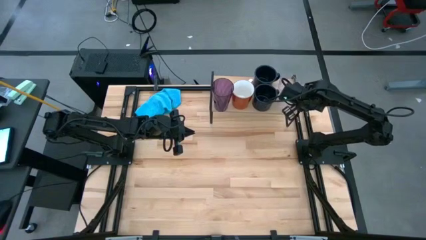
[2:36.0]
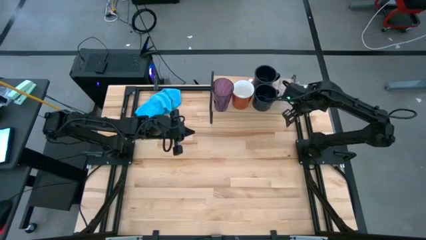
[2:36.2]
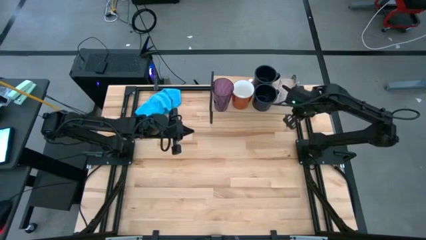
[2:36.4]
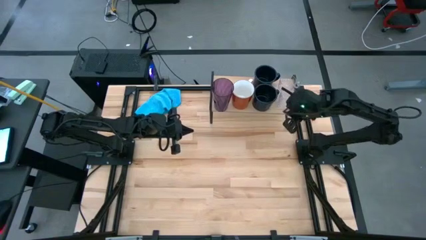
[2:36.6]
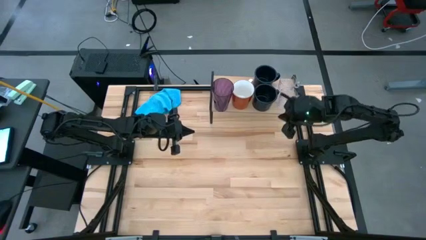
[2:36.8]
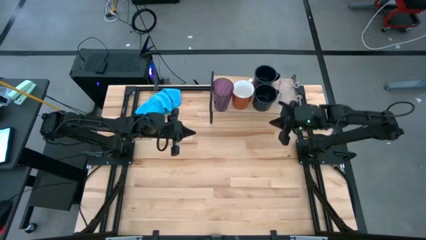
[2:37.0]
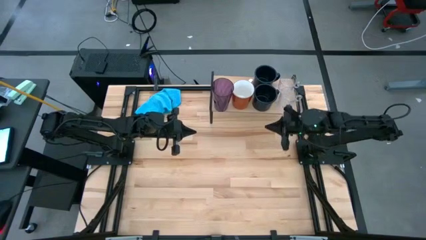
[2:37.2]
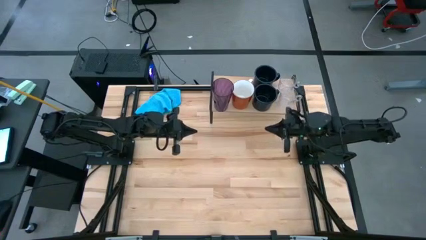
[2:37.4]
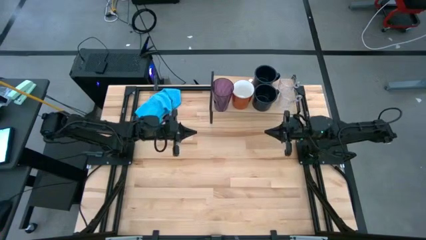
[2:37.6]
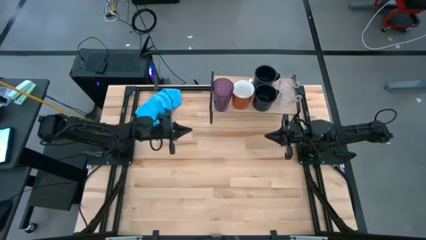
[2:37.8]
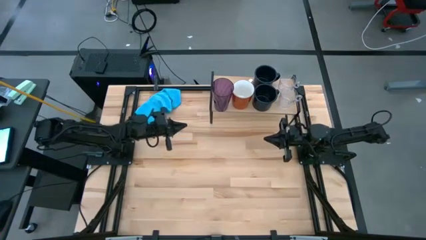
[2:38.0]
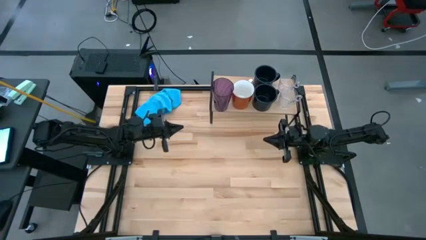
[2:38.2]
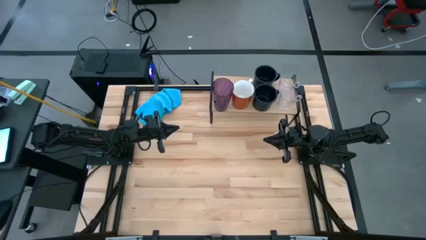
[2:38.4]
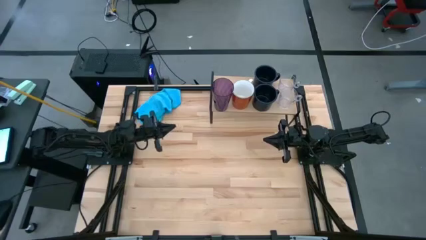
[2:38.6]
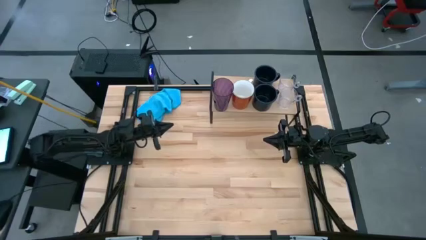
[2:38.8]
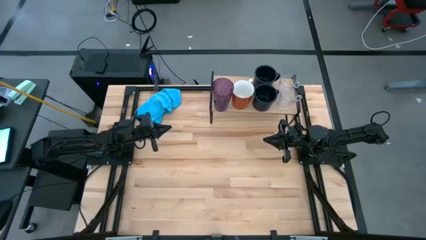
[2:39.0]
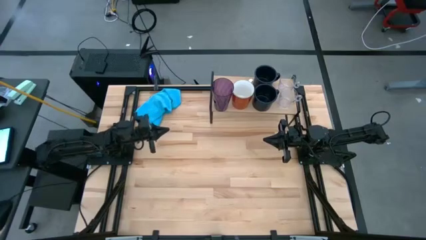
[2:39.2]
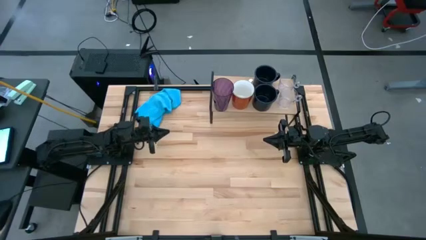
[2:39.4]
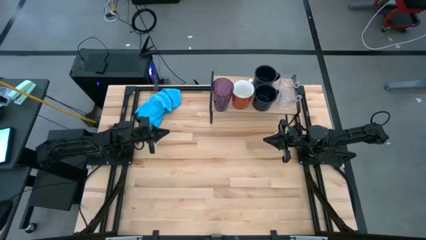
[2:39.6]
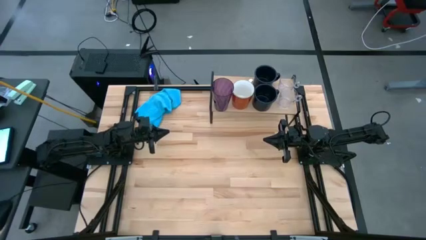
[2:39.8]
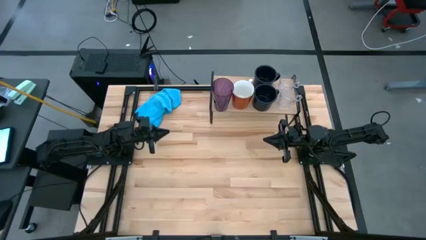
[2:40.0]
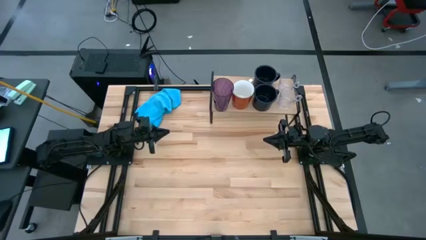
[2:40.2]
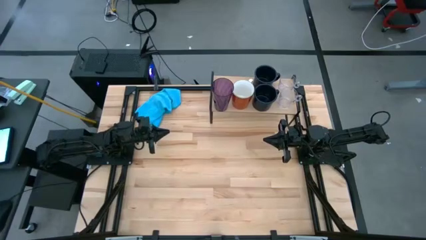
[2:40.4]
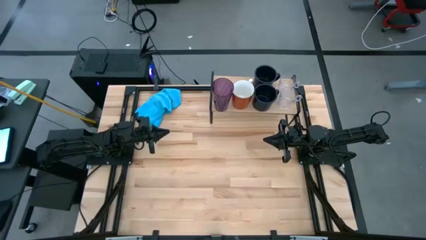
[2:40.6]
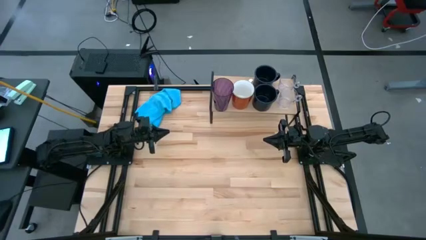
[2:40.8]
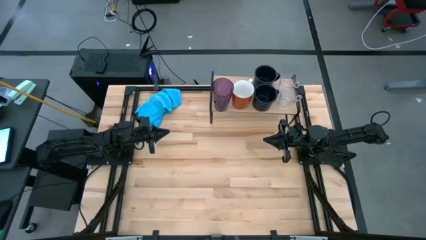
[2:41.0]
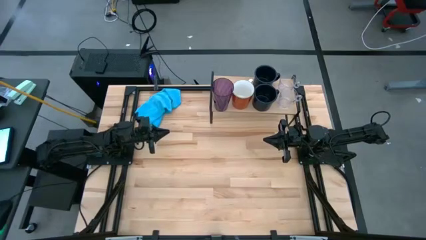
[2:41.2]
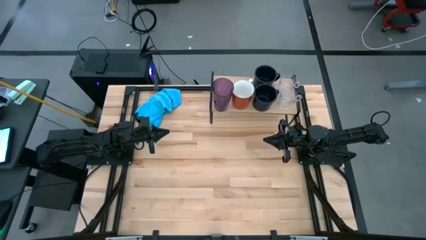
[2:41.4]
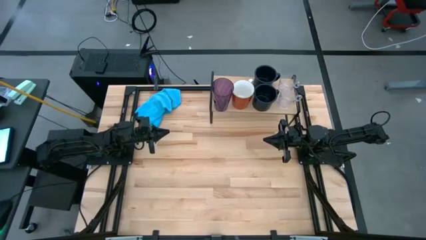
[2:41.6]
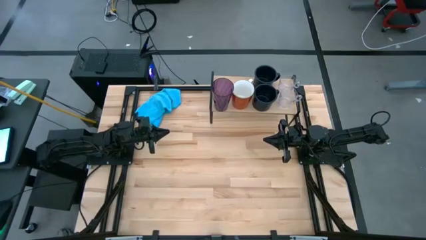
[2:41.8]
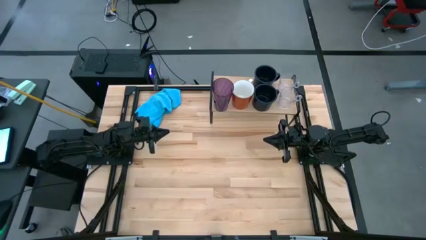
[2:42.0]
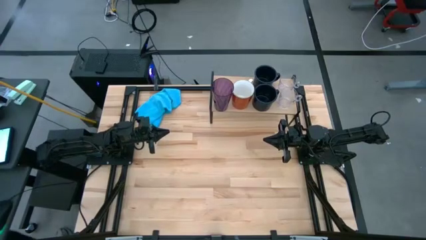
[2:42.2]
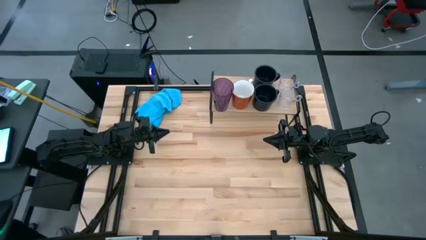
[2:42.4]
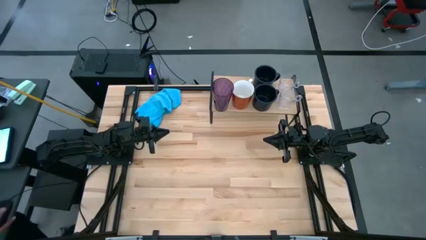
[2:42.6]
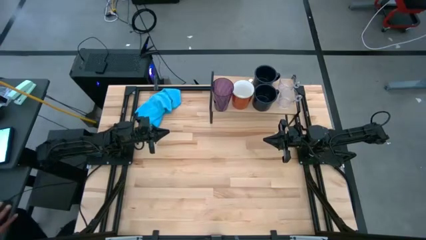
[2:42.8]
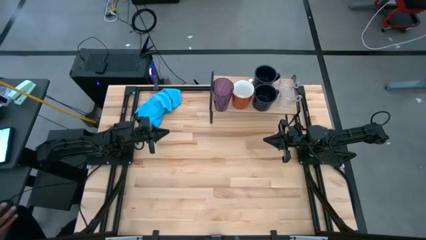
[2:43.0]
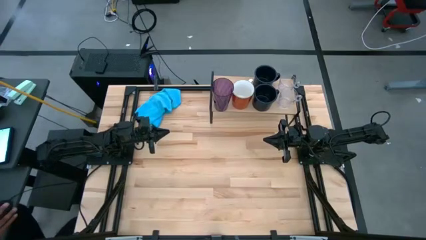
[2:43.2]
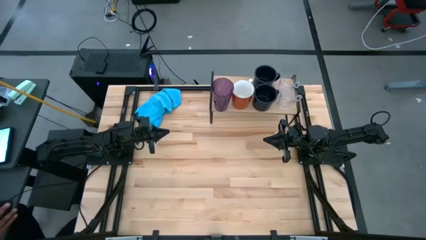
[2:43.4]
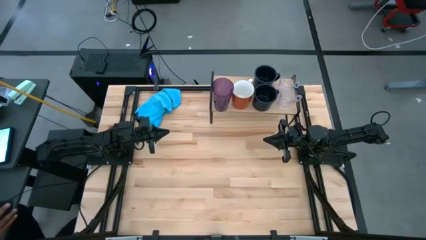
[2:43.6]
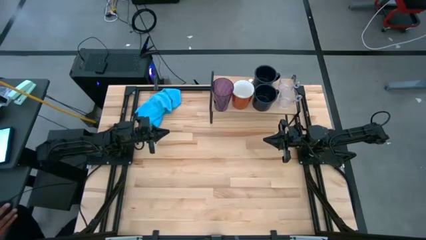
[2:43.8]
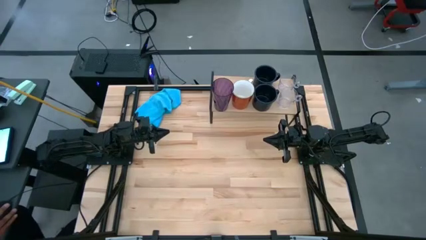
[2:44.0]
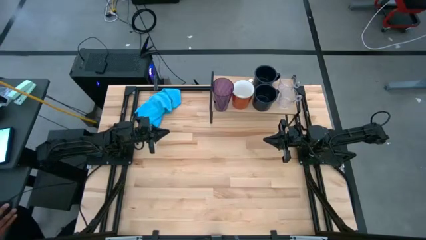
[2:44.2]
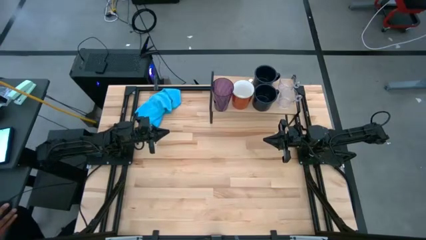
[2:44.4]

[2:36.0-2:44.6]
Task: Stack small to large cups/mugs on shelf
Return to Home Position

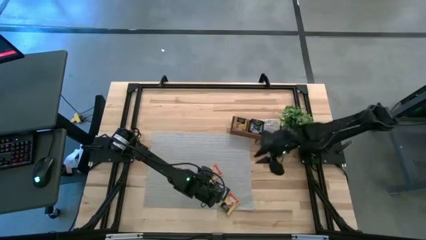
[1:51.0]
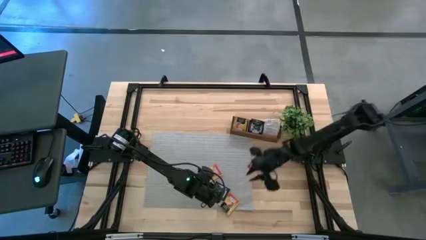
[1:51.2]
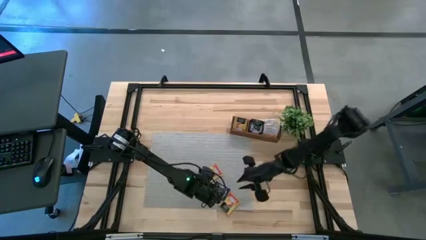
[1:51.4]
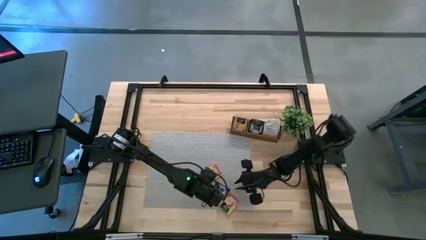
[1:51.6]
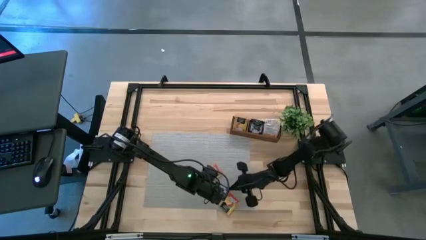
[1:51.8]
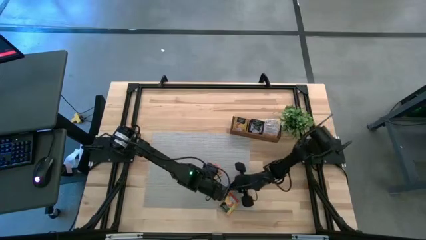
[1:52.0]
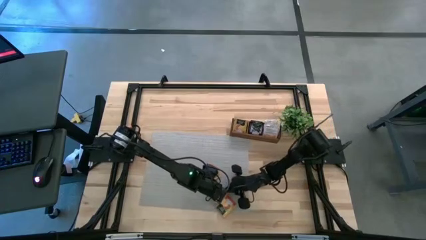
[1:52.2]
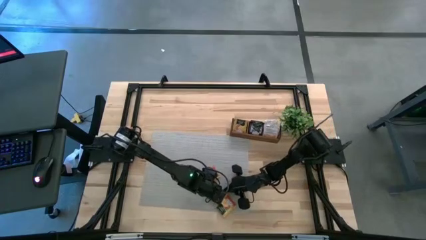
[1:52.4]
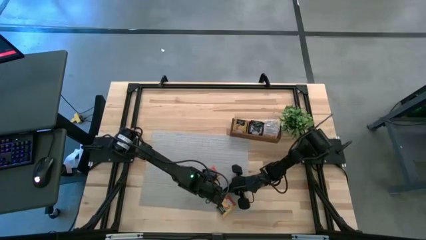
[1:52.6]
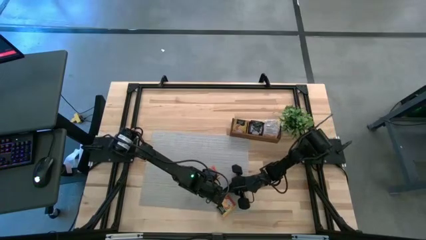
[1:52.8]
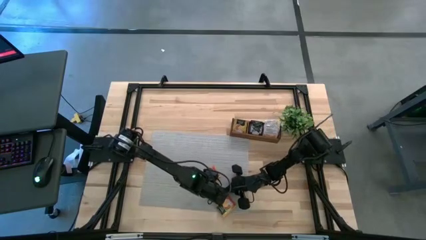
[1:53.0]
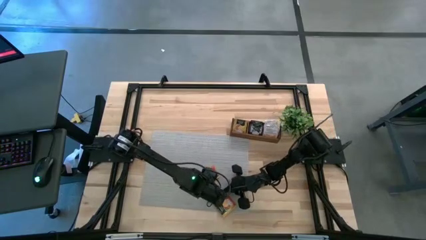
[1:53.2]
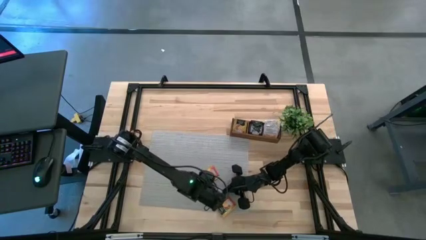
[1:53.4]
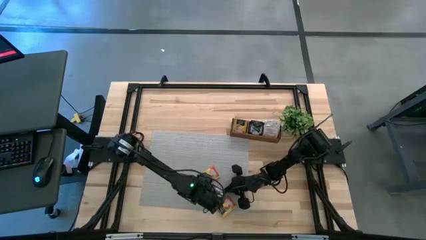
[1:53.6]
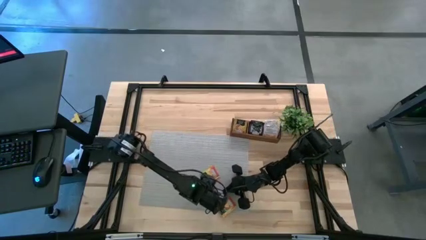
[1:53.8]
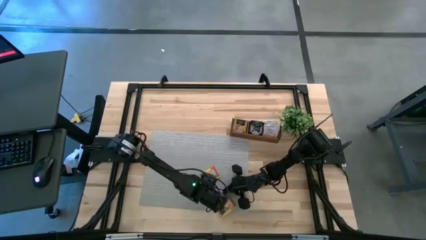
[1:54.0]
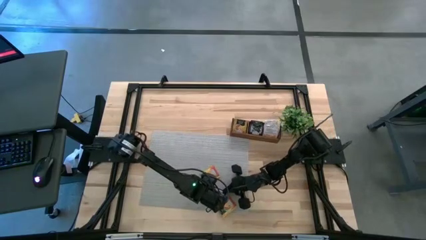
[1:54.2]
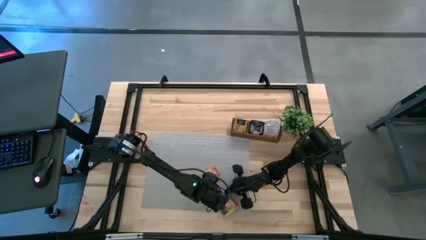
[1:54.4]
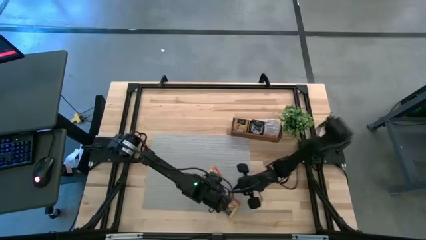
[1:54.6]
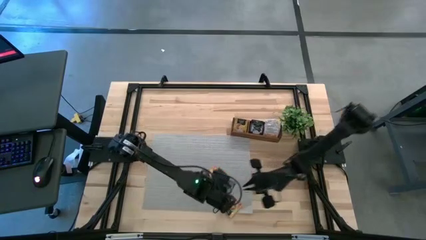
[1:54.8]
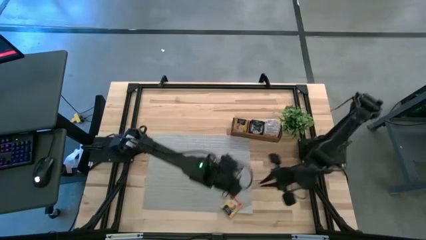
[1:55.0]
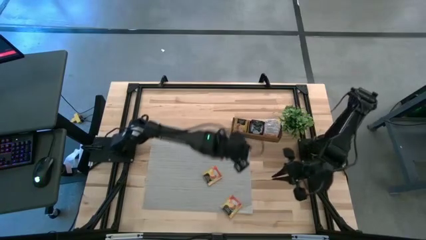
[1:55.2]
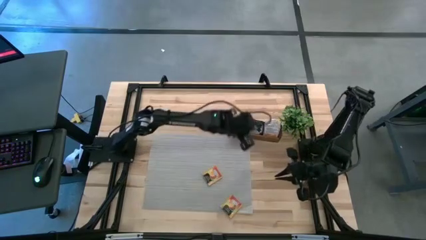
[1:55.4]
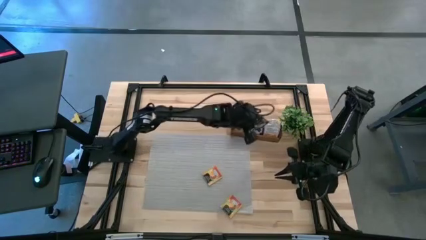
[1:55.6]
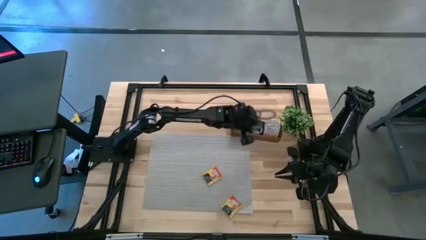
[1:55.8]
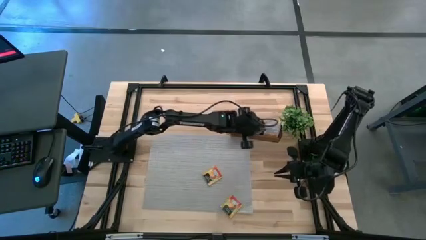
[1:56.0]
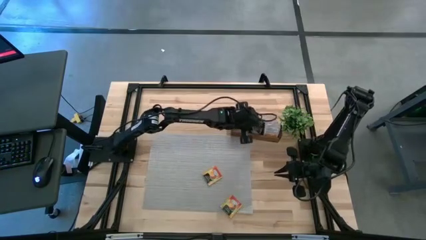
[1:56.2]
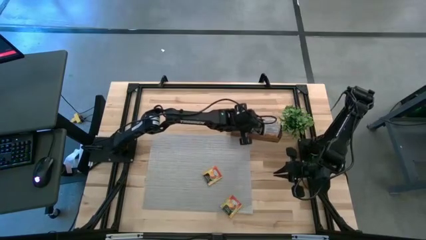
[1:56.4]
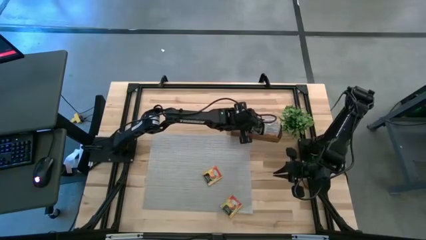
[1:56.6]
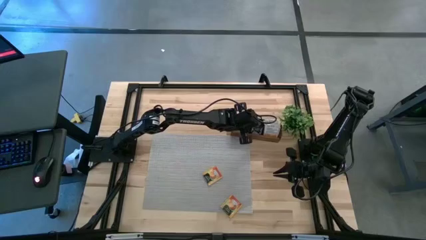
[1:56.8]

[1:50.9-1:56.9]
Task: Pick & Place Tea
Put the dark purple tea bag in the middle section of the wooden organizer
